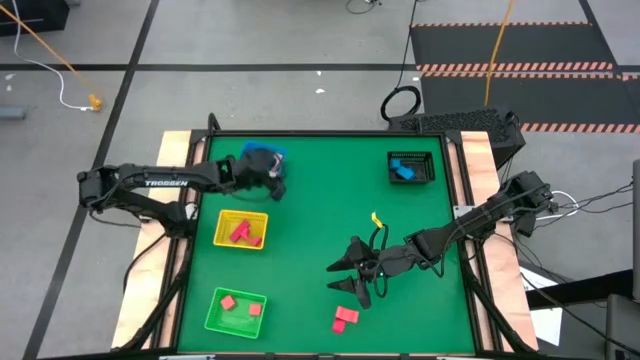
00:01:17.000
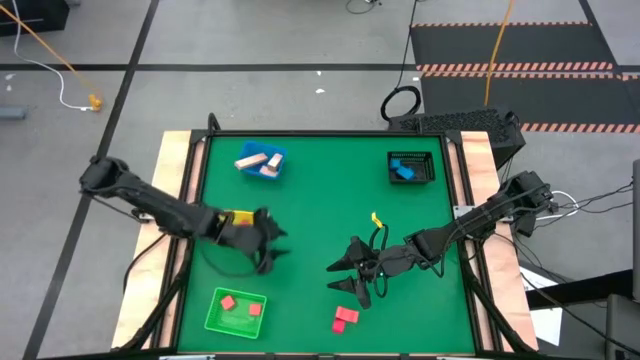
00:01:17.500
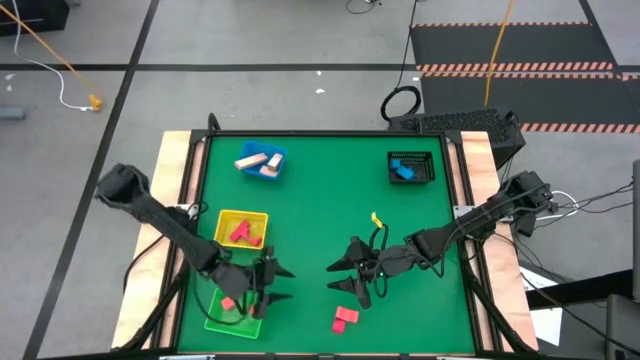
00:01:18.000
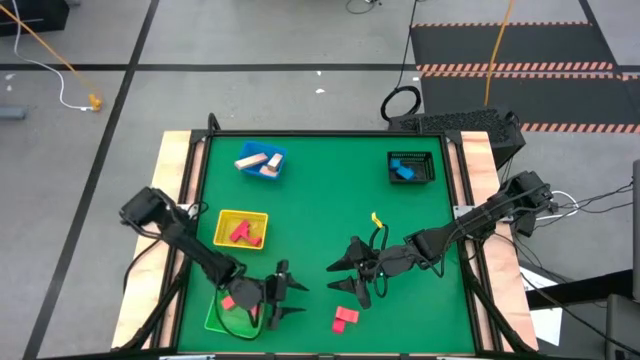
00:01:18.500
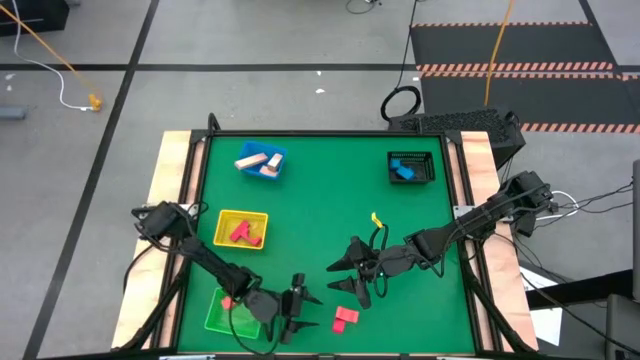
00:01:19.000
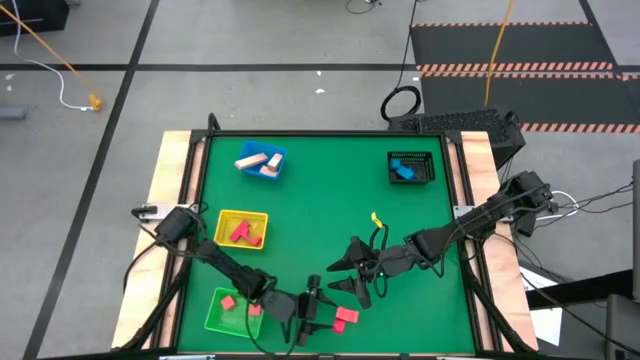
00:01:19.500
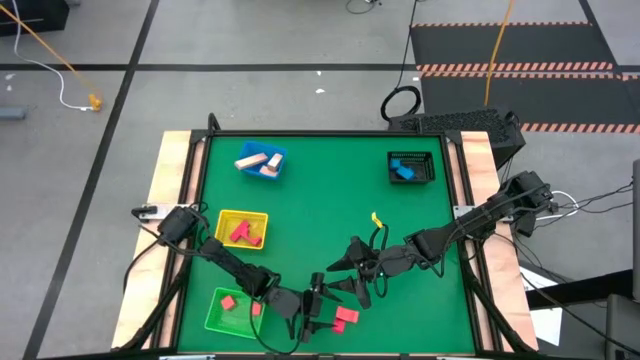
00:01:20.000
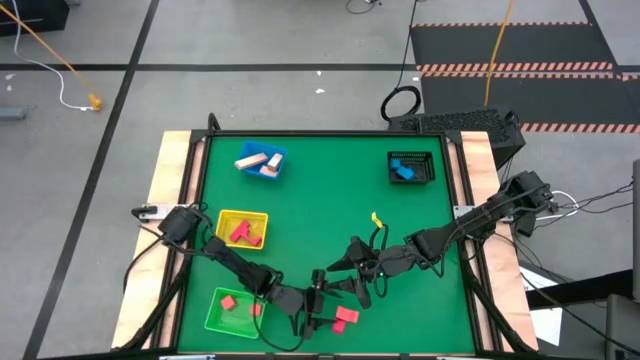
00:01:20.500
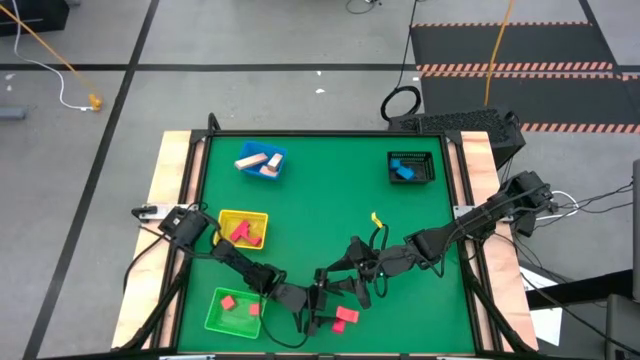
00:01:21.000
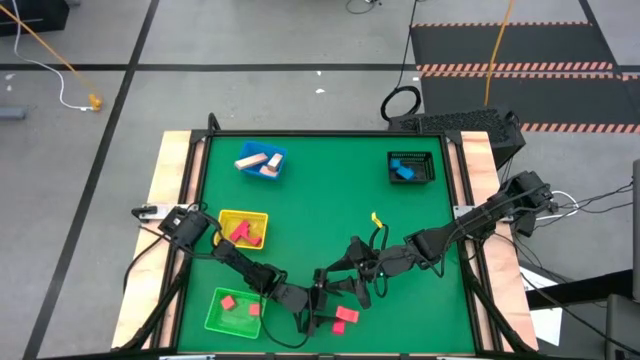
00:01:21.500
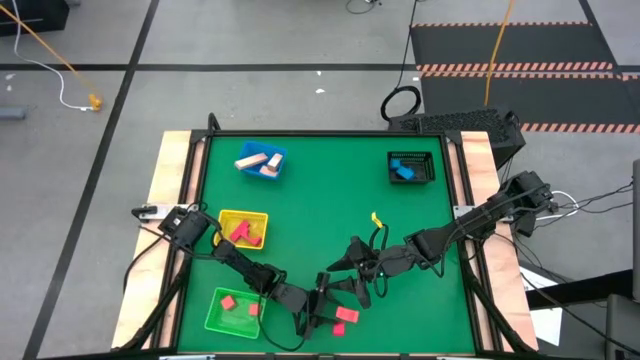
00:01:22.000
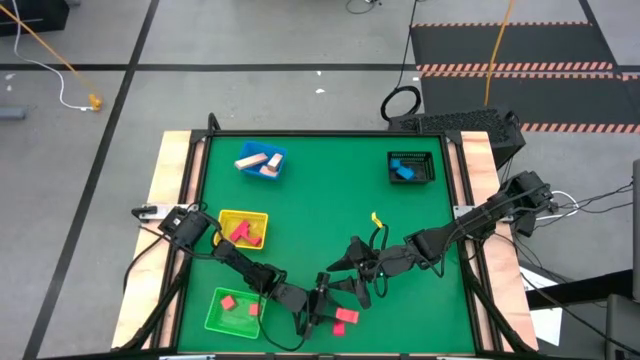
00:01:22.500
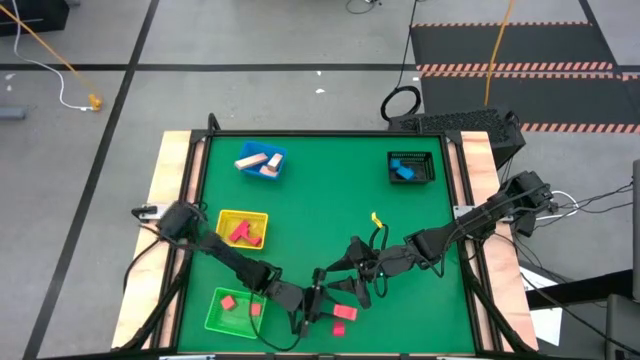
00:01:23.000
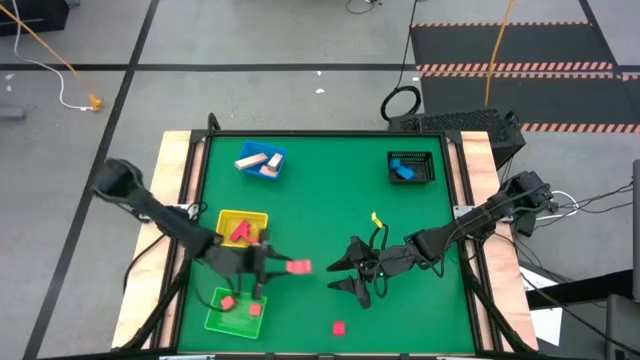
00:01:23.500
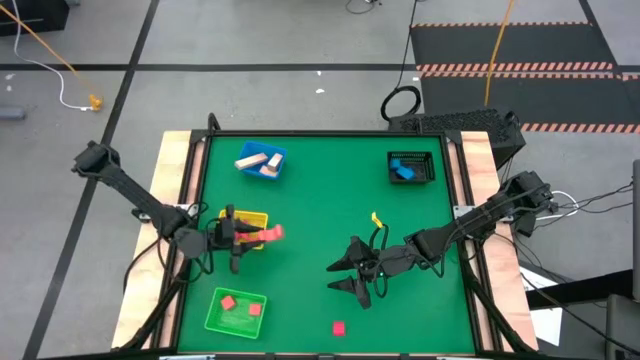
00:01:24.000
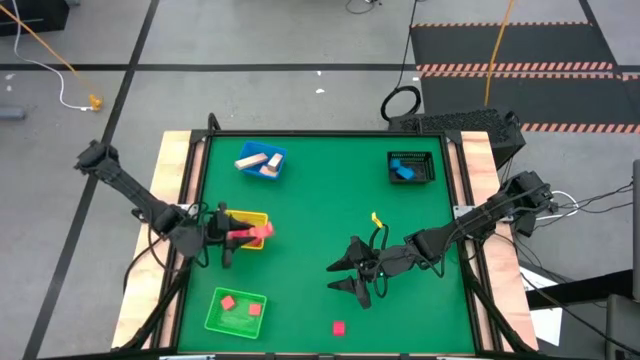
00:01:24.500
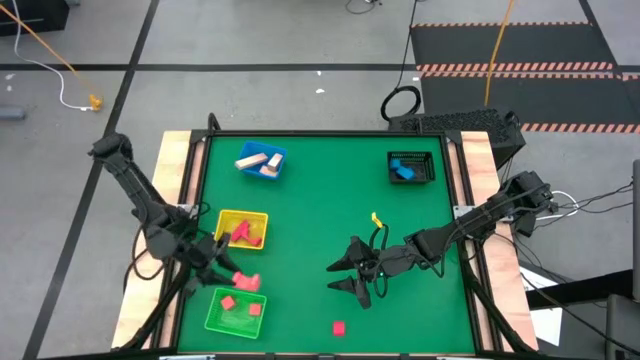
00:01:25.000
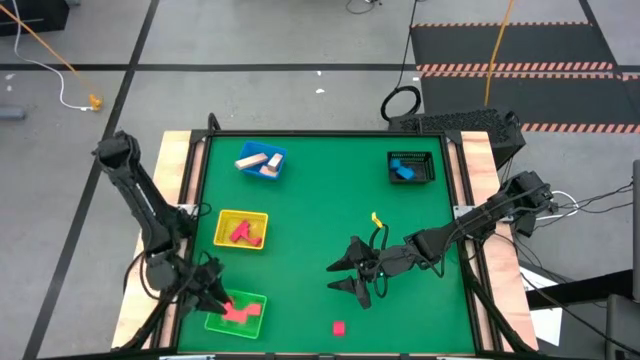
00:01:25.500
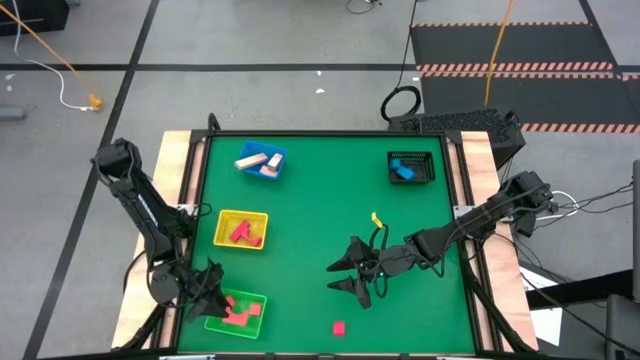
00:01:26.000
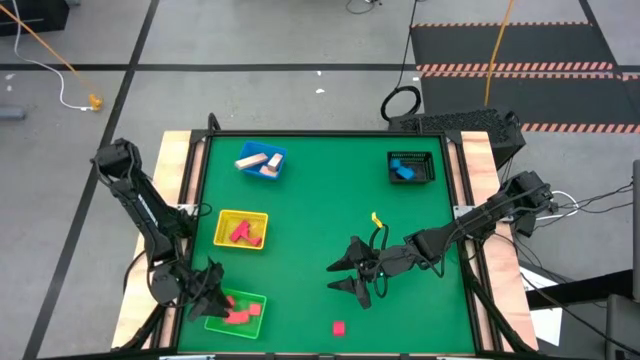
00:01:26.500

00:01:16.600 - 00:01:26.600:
Task: Sort & place blocks by color
Put the orange block into the green bin

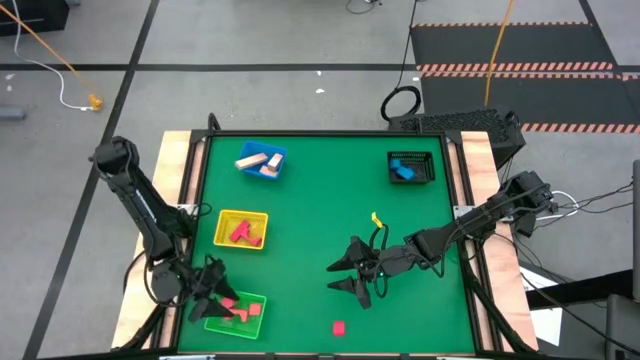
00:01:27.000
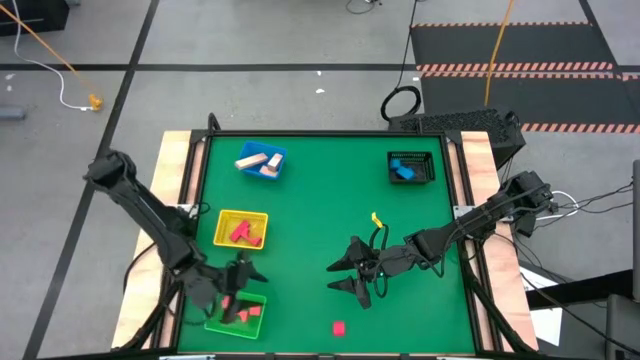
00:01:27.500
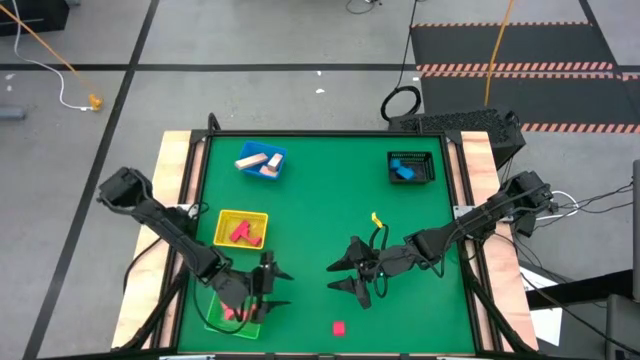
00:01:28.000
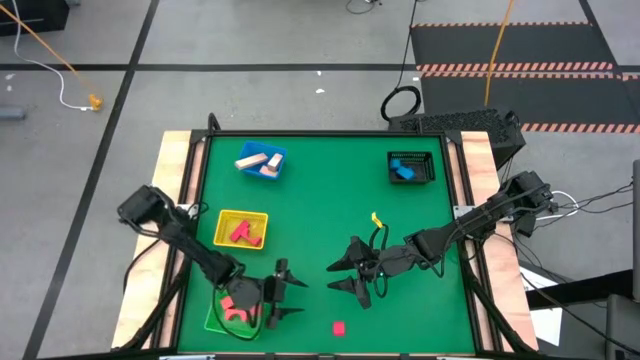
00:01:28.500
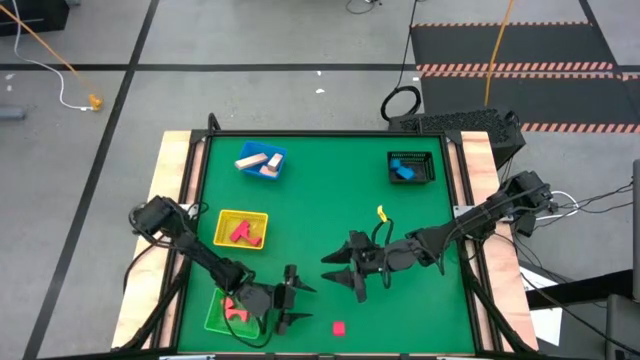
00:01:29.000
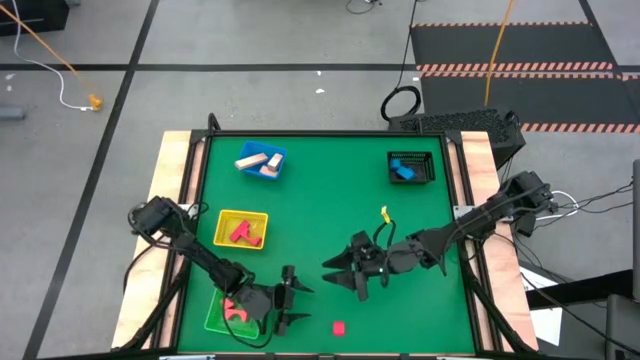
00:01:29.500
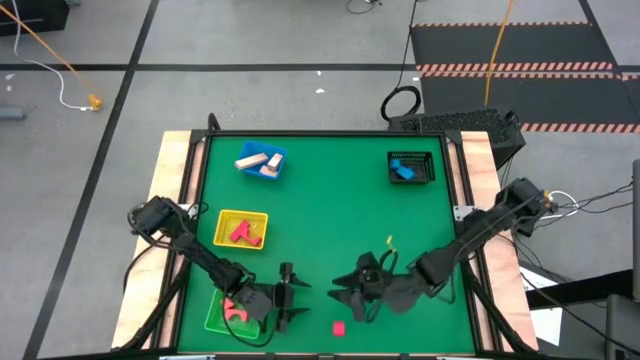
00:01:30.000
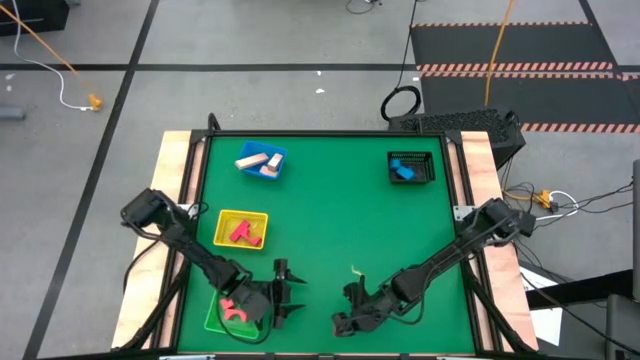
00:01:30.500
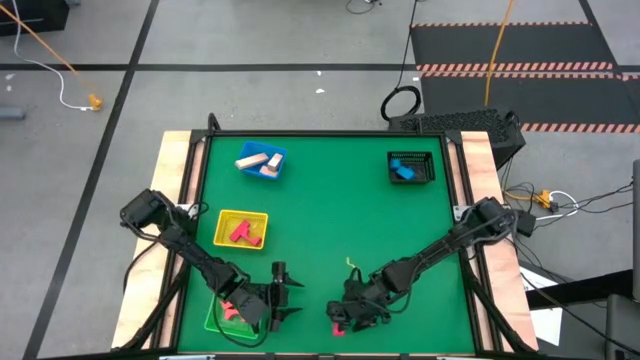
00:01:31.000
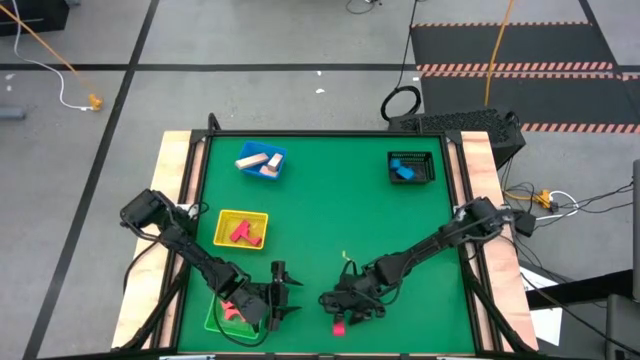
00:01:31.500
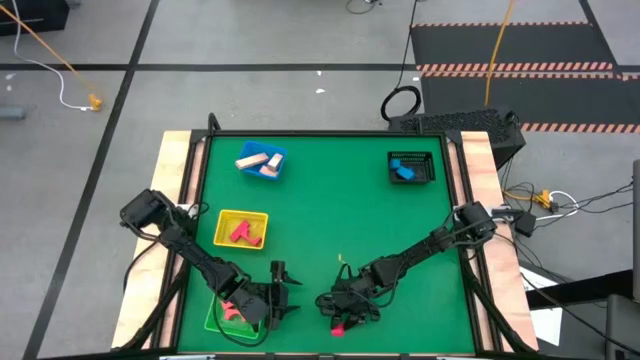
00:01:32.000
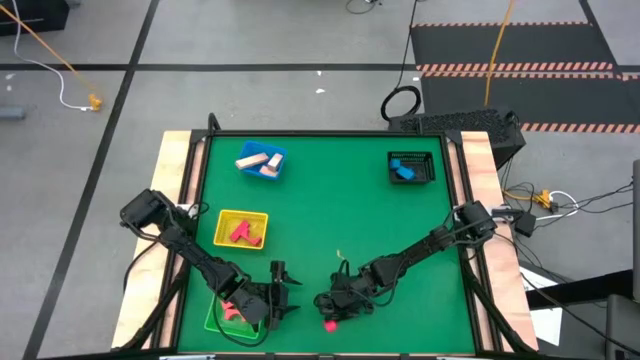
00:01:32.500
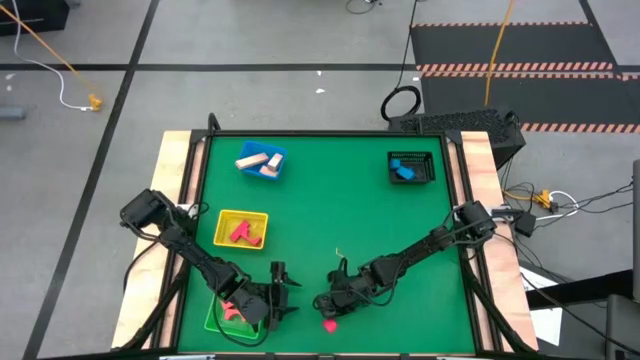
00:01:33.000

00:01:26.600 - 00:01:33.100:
Put the red block into the yellow bin

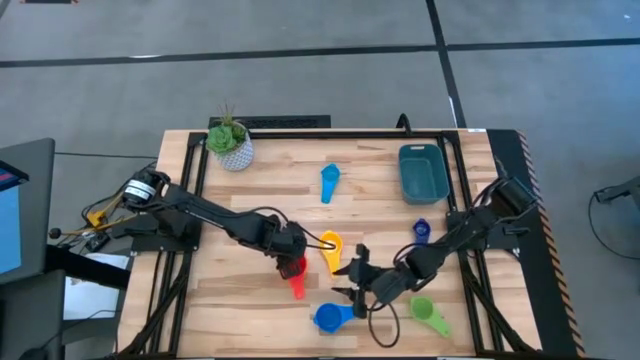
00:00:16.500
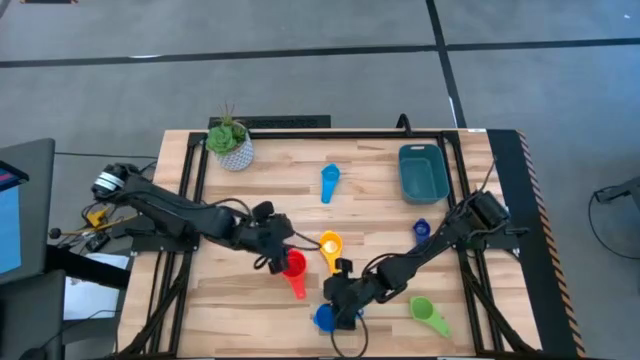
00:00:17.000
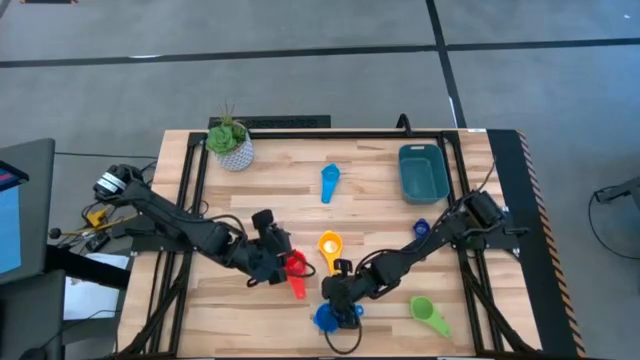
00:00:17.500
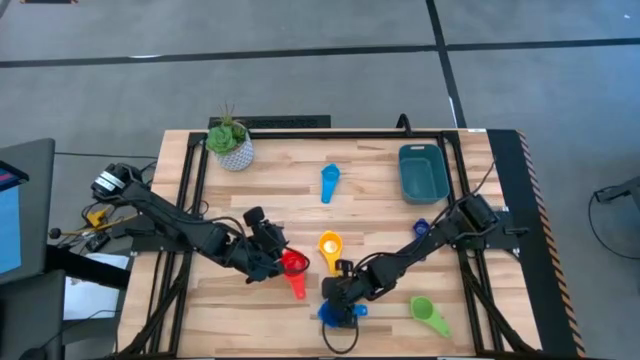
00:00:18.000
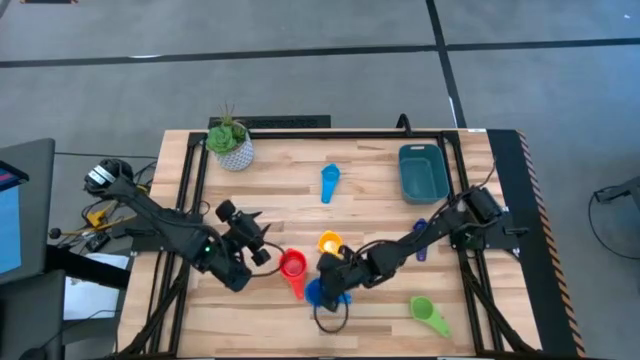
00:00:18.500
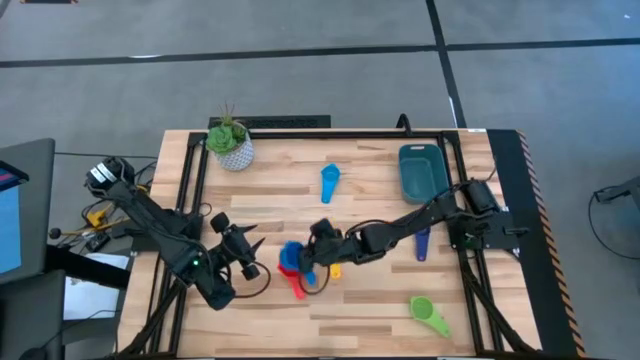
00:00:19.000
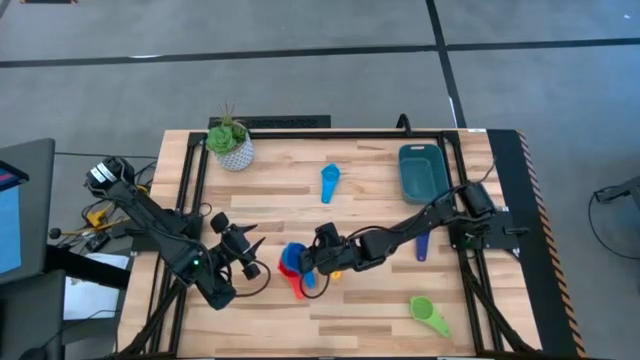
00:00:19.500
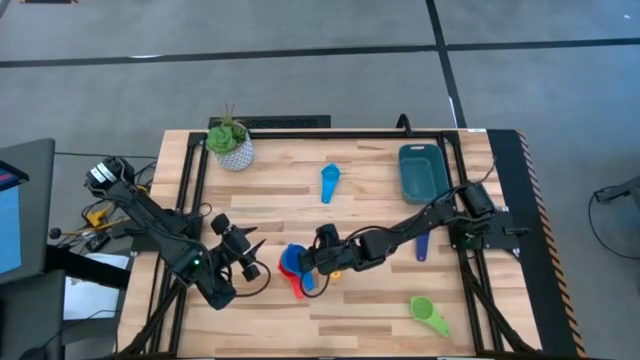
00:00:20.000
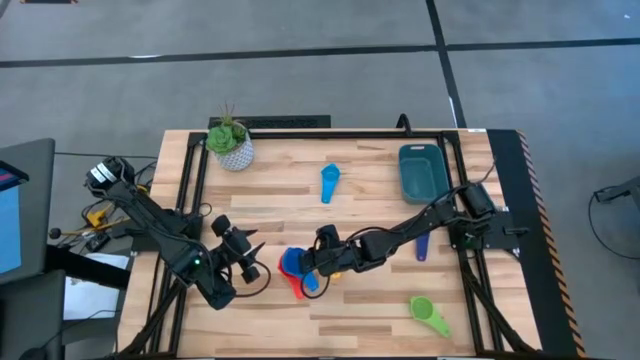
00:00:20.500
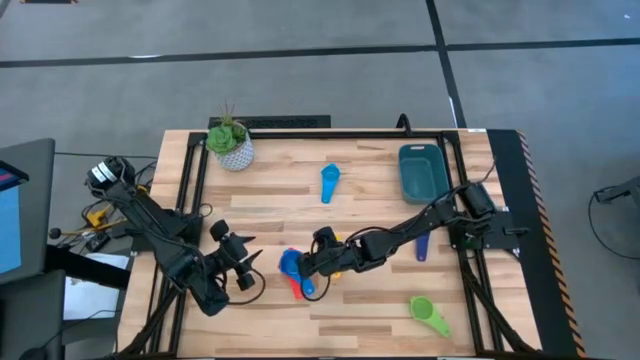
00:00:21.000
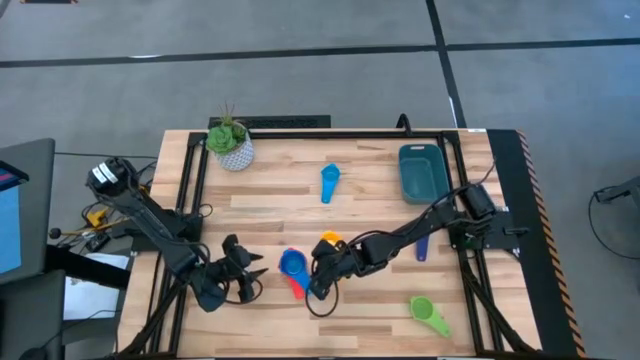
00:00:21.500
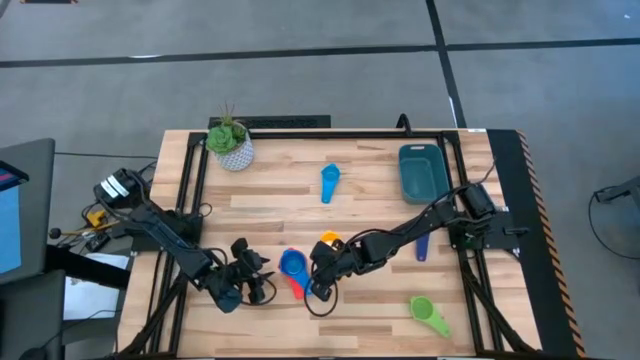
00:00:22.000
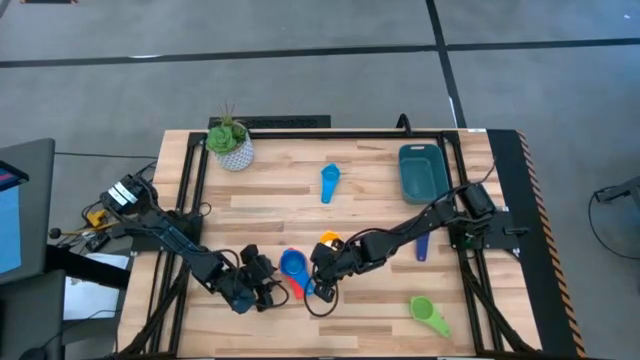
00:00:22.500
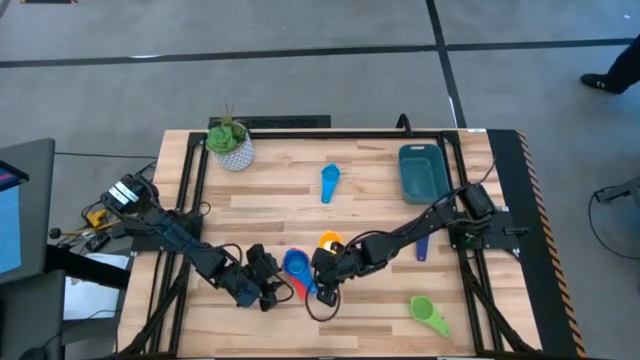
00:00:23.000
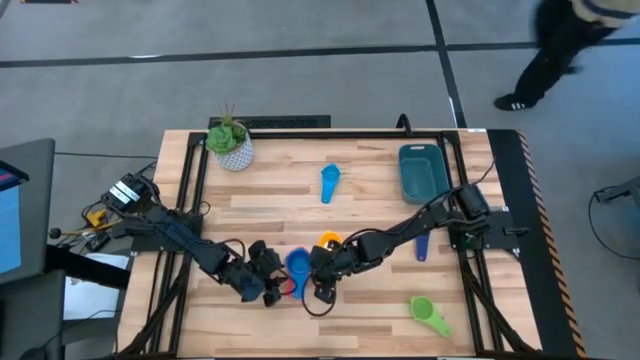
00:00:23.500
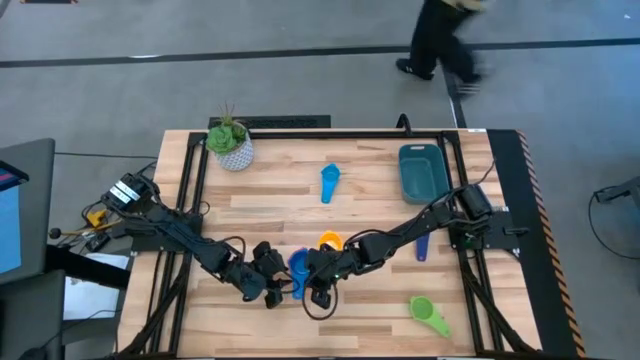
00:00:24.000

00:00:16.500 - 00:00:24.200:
Task: Nest measuring cups in basket
Stack the blue measuring cup into the red measuring cup
